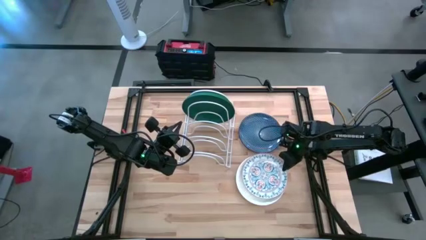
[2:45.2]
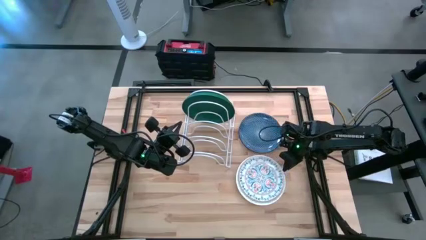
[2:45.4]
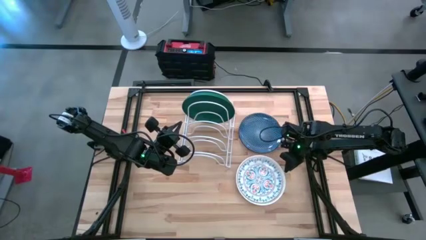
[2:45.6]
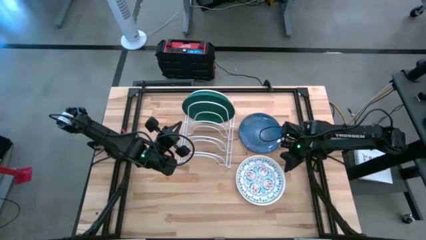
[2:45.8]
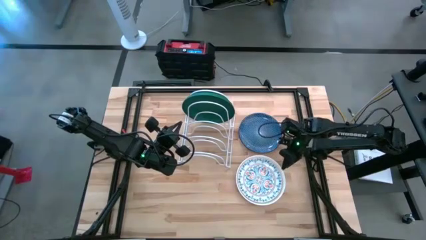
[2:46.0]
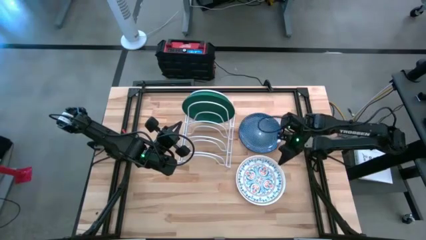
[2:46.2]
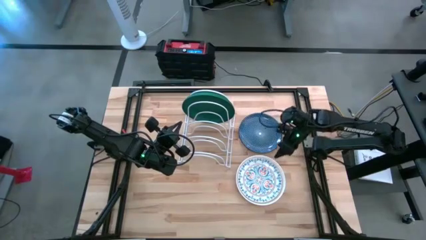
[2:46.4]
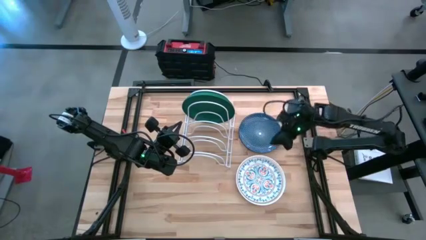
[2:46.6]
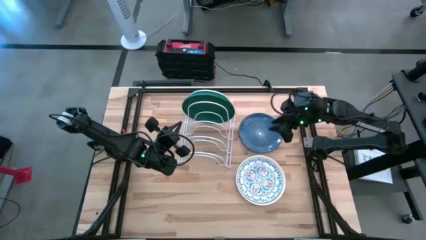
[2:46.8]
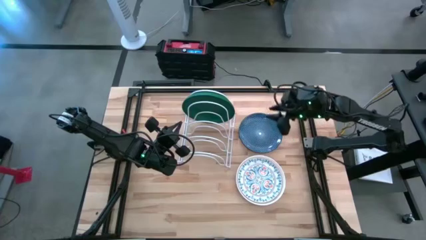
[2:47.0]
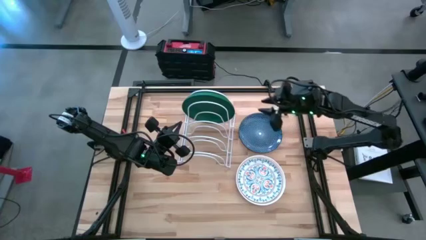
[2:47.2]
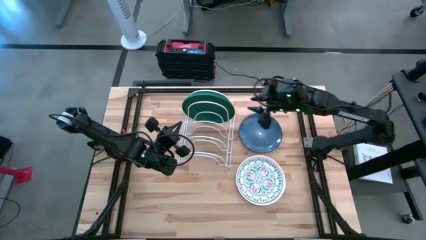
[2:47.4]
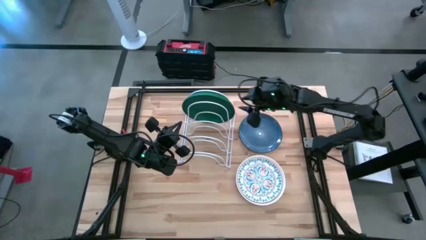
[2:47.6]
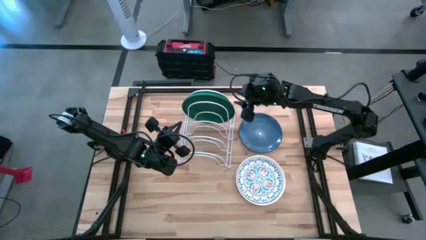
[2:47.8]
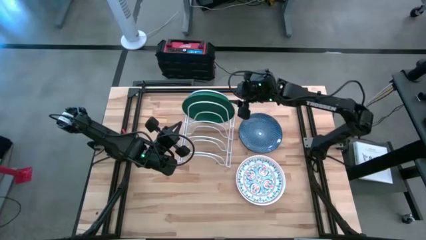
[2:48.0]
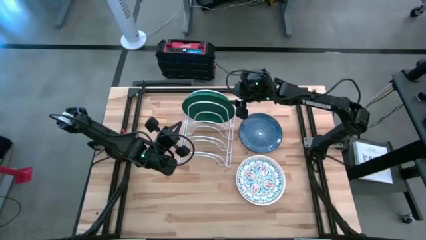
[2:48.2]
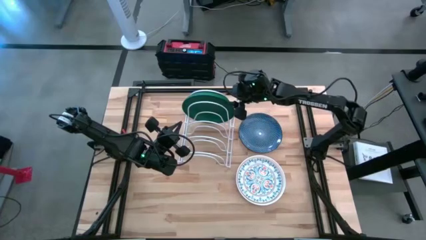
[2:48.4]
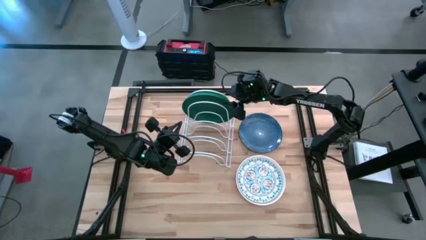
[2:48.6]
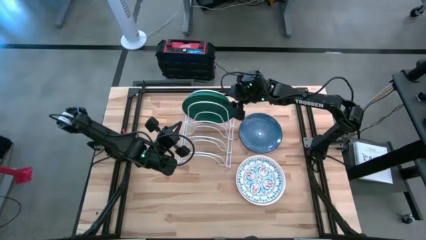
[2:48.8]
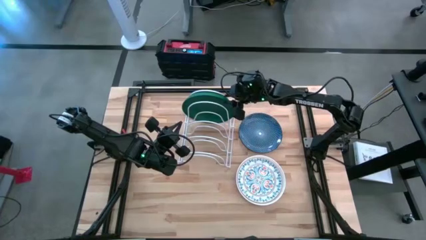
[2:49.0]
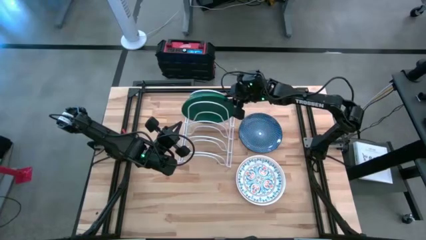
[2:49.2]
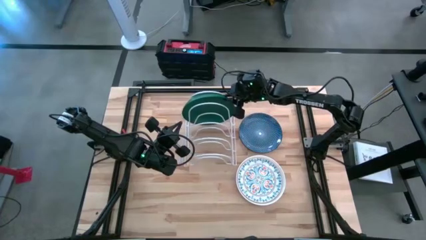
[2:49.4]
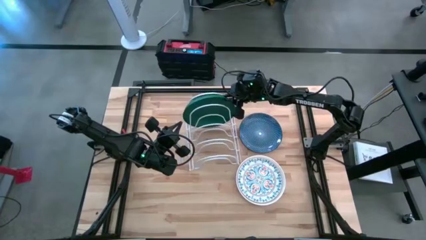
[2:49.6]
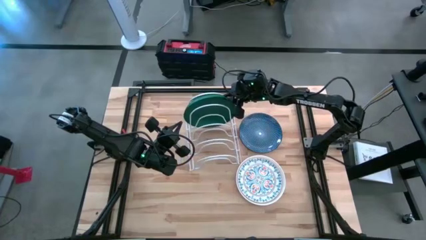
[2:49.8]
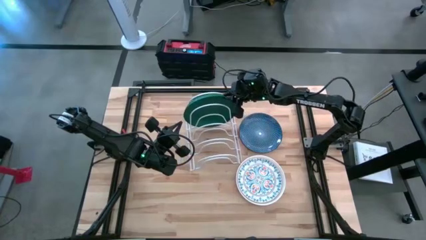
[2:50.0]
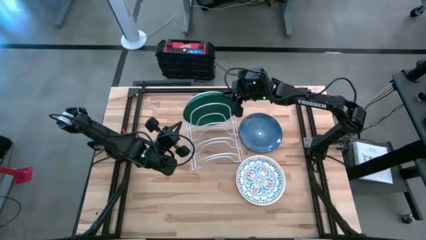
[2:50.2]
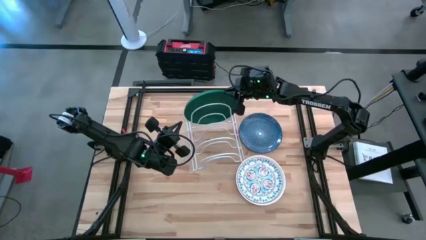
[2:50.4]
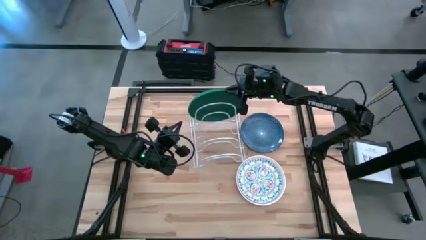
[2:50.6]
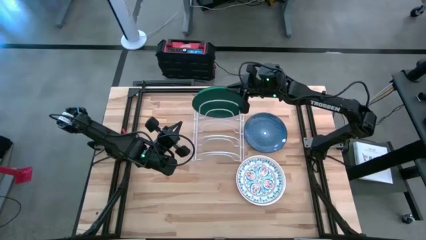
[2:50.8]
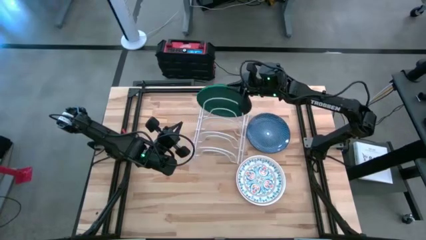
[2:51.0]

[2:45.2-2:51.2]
Task: Sort dishes
Remove the green plate from the dish rack

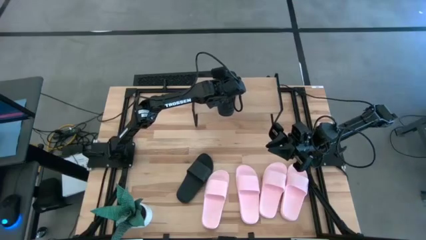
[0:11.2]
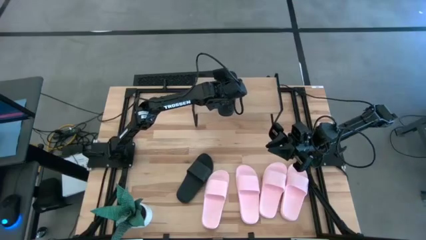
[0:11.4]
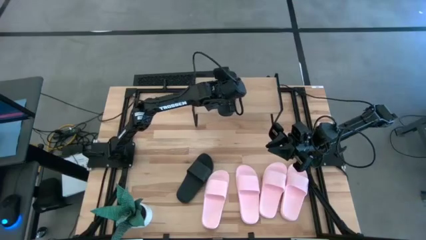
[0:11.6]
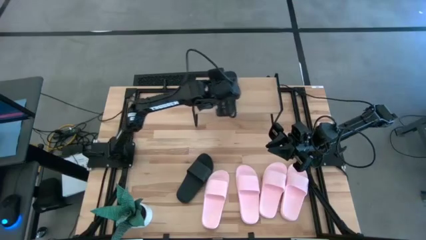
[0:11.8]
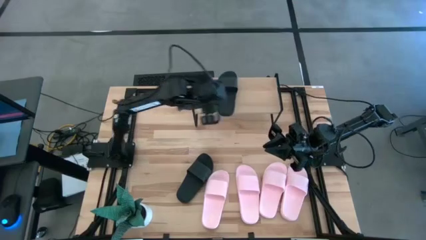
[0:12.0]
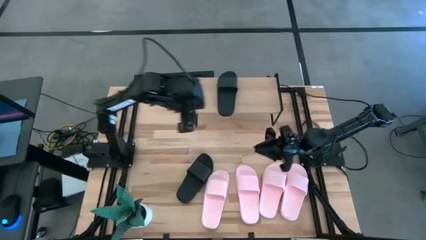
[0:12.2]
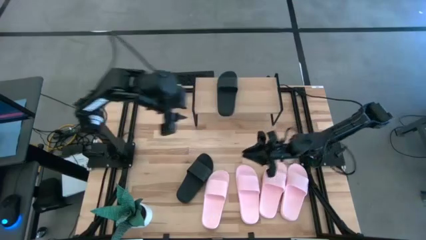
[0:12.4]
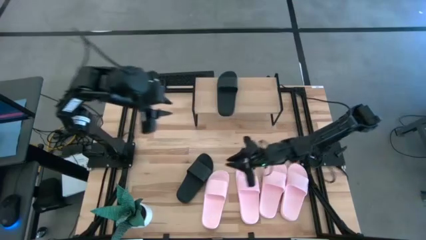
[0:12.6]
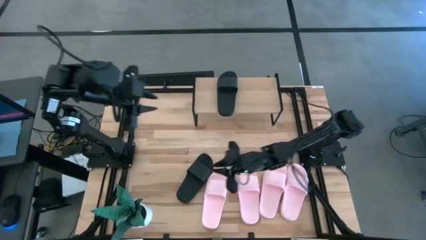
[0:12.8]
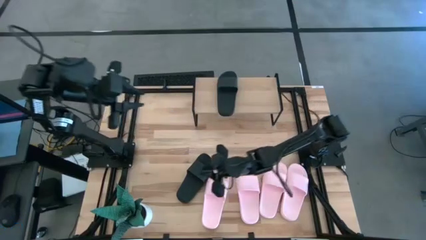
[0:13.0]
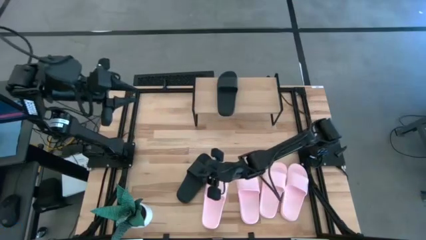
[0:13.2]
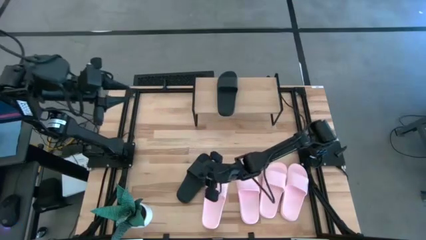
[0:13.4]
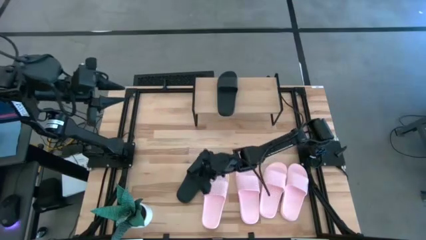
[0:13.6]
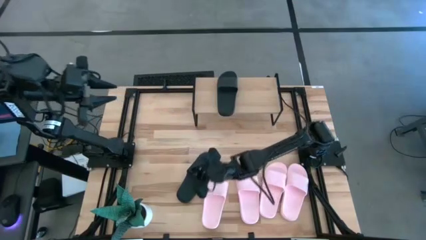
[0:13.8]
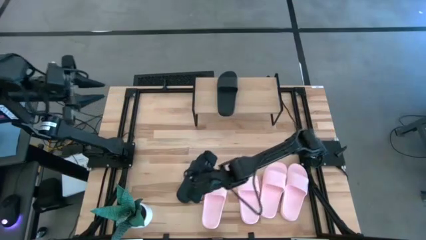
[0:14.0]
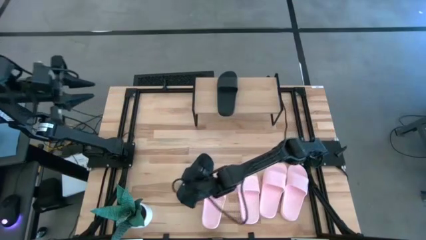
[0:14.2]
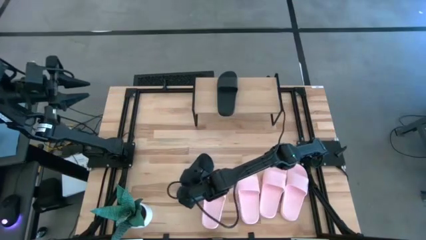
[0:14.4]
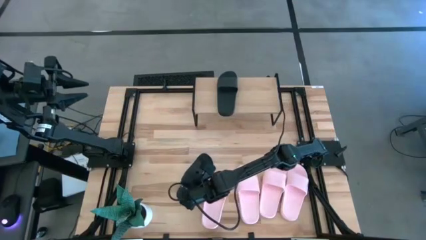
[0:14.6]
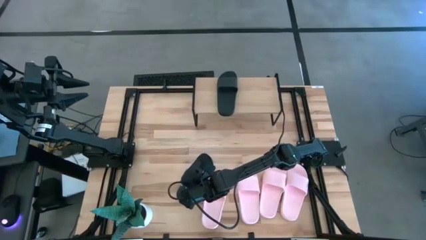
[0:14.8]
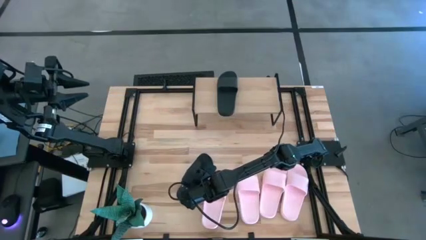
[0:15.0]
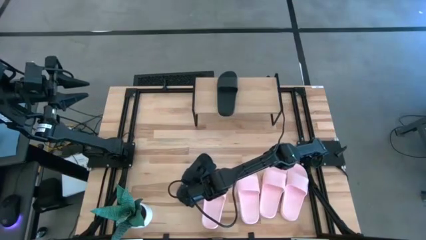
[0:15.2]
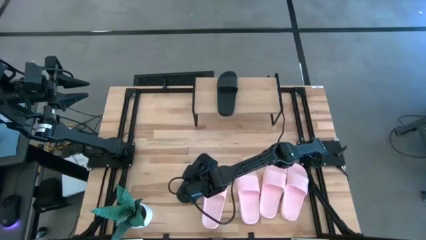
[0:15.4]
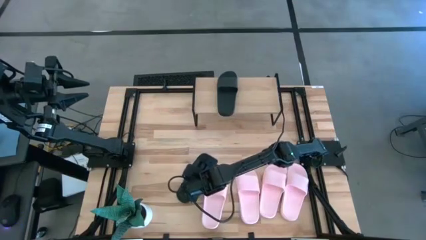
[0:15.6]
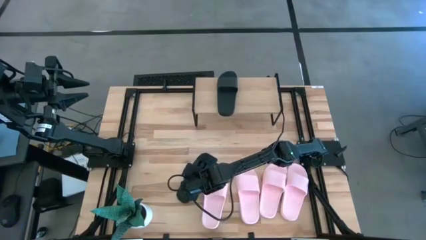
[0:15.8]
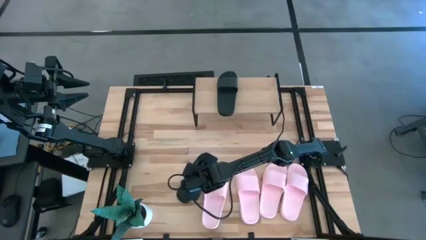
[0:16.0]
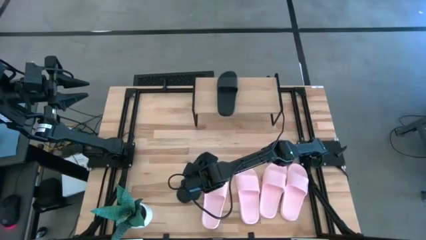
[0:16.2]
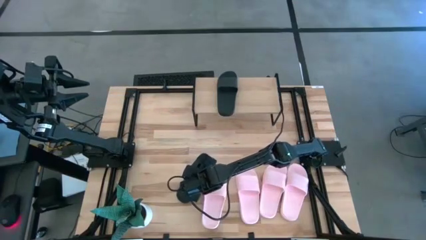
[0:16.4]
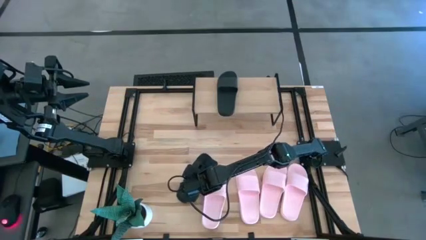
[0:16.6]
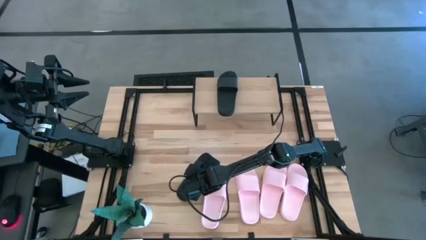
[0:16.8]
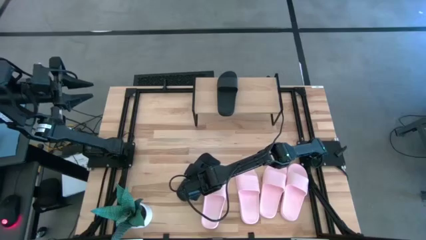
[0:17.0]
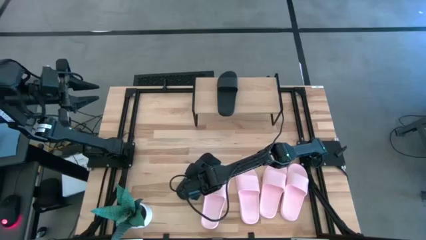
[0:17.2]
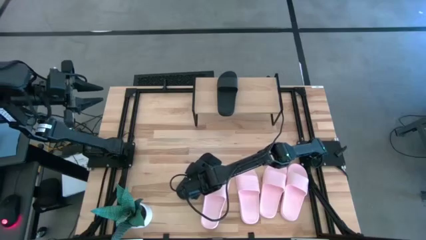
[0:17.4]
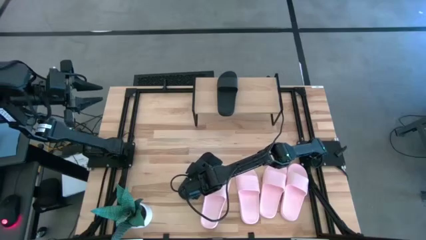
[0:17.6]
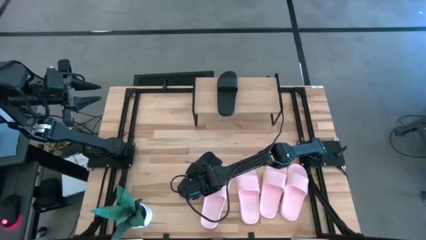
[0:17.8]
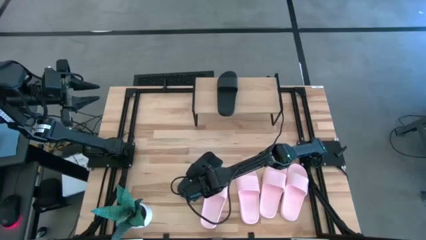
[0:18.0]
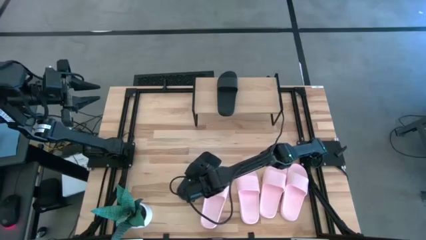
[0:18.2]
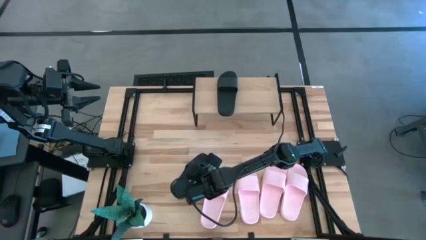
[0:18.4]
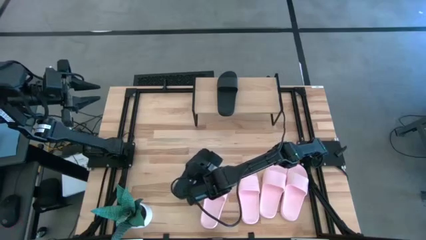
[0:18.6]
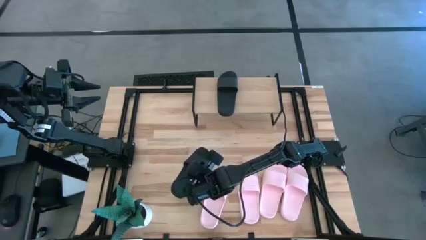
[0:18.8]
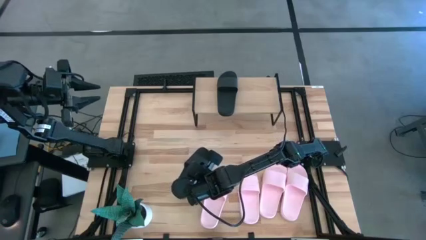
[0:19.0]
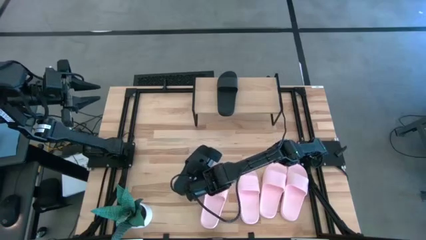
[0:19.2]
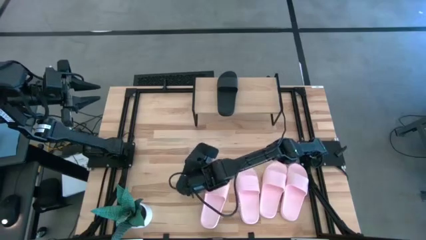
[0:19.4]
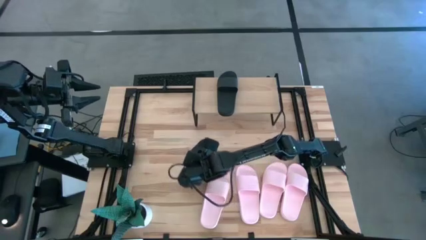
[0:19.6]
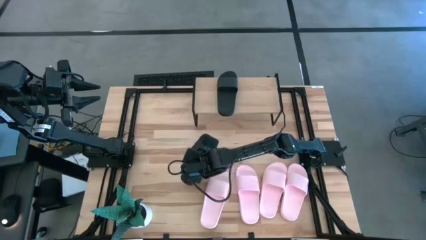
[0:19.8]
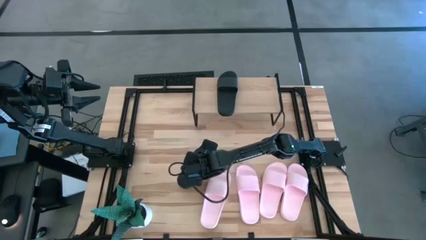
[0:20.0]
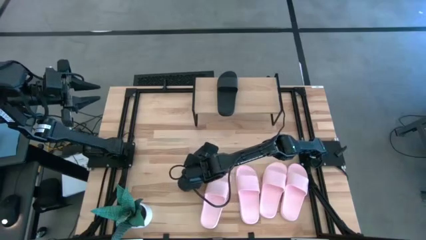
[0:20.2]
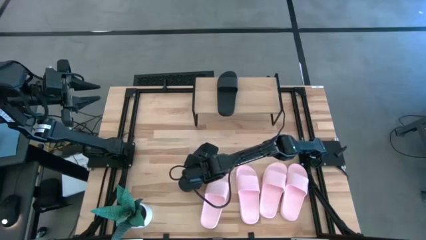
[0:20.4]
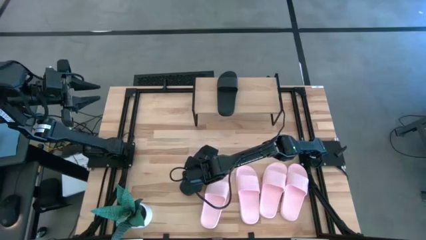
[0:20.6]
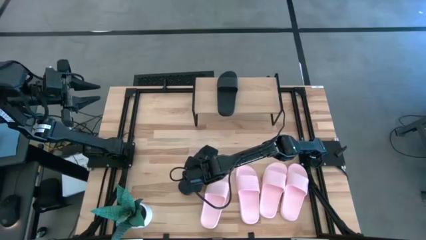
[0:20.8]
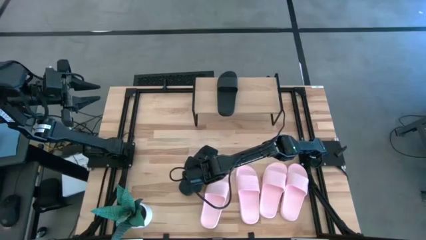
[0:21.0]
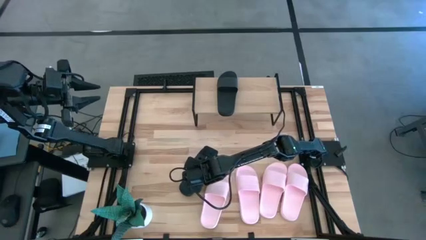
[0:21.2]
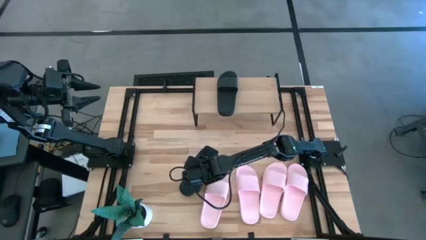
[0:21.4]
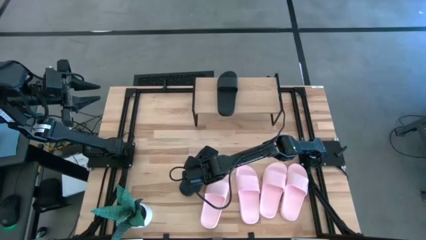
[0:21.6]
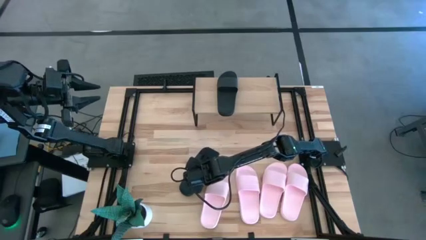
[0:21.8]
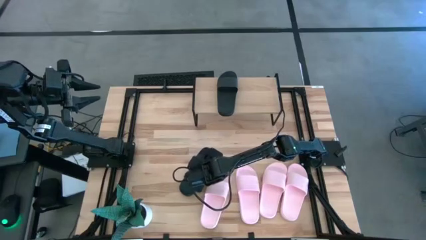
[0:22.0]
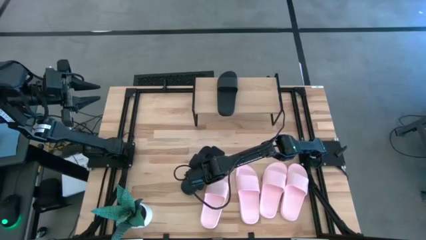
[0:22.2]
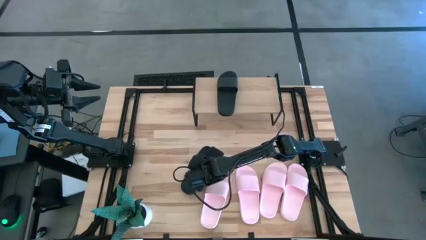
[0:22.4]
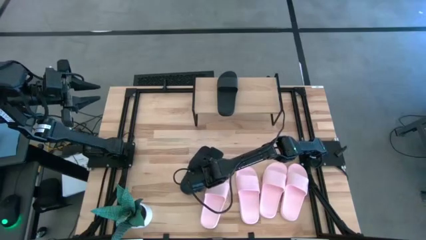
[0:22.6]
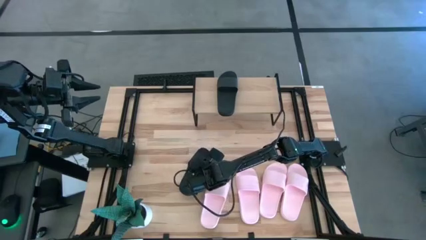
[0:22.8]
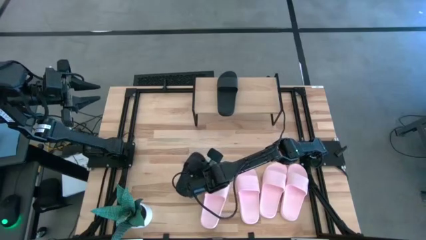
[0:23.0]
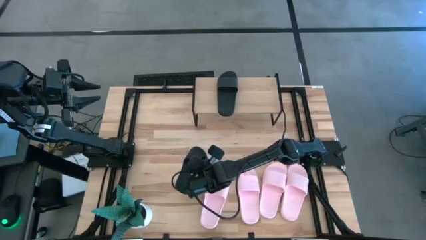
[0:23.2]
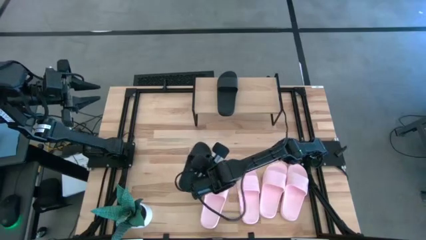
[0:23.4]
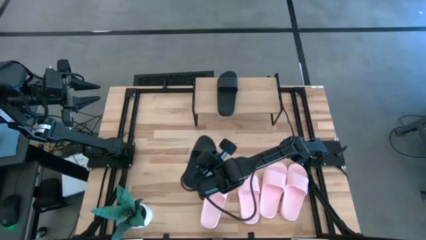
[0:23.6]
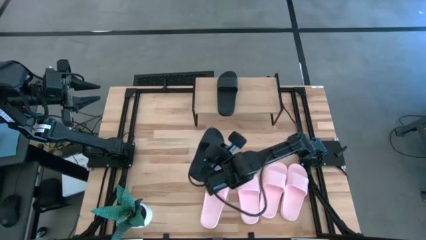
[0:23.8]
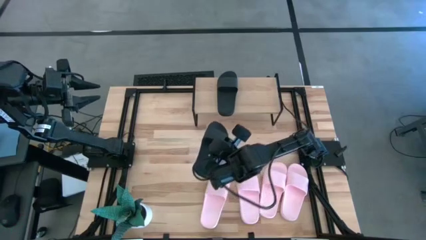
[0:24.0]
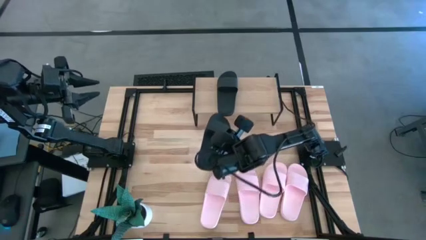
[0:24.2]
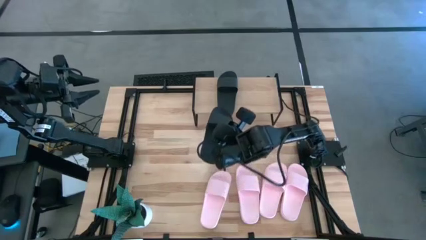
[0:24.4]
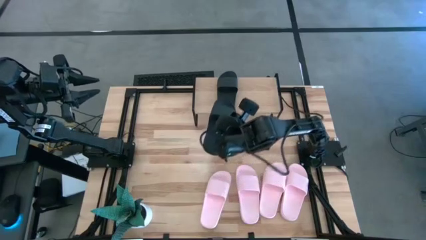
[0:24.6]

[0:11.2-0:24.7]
Task: Pick and place slides into the shelf
Put the black slipper on the shelf
